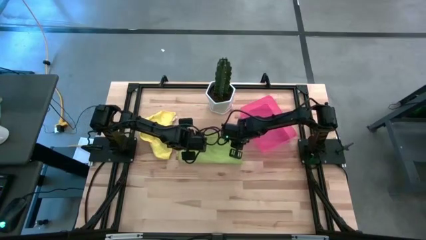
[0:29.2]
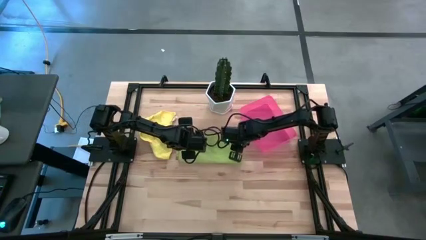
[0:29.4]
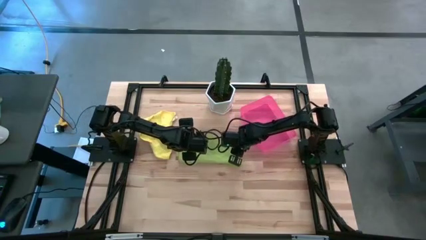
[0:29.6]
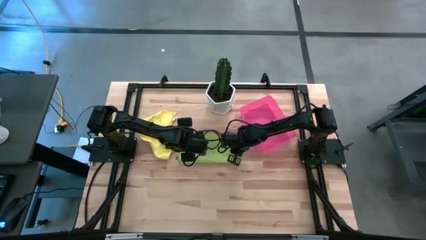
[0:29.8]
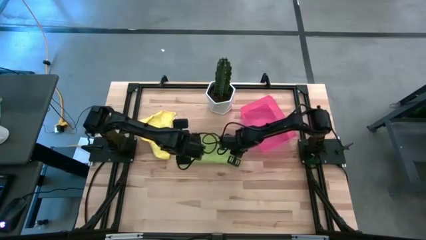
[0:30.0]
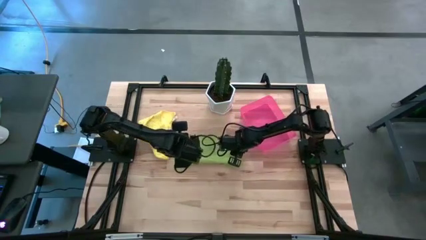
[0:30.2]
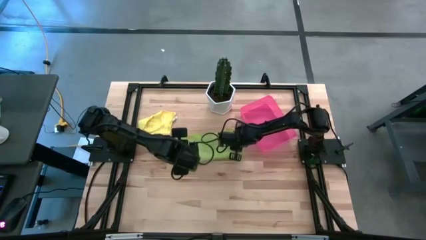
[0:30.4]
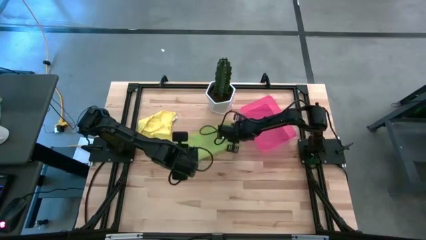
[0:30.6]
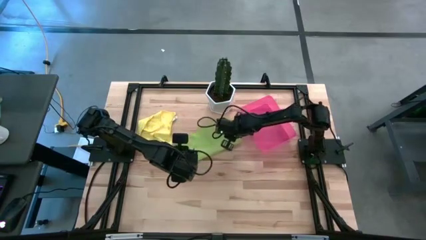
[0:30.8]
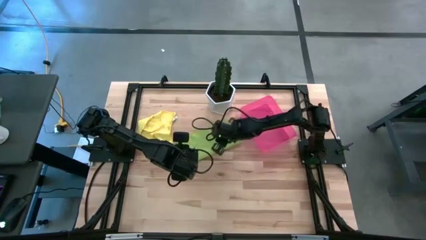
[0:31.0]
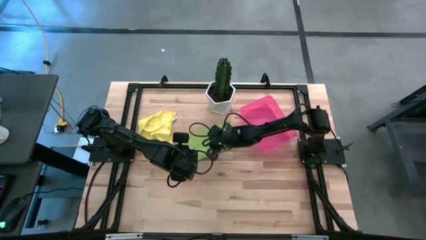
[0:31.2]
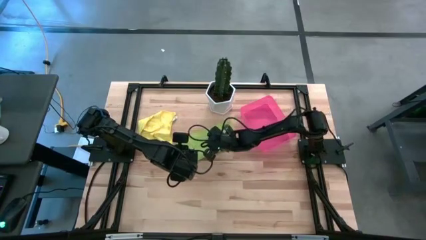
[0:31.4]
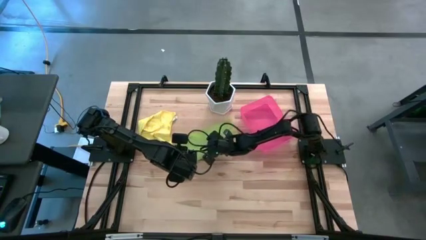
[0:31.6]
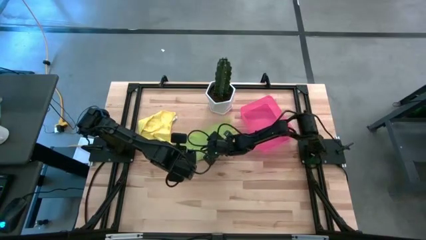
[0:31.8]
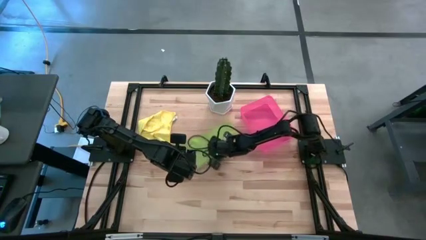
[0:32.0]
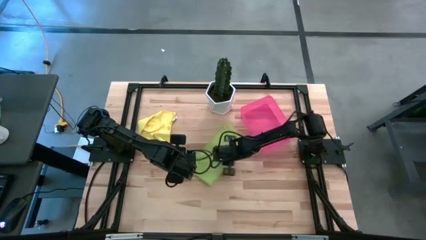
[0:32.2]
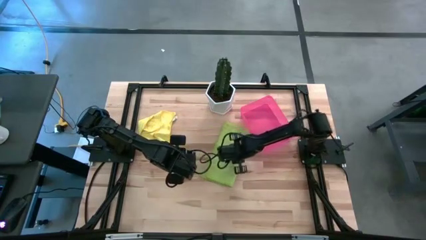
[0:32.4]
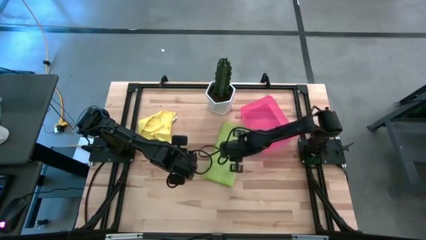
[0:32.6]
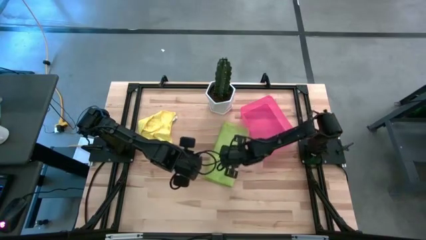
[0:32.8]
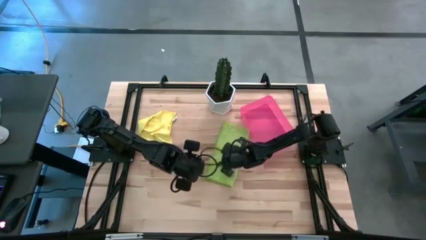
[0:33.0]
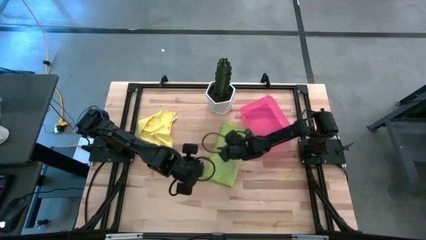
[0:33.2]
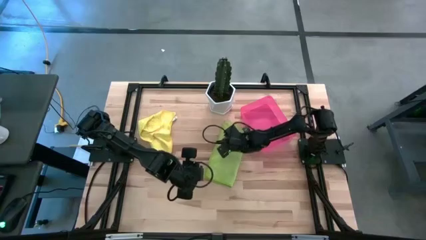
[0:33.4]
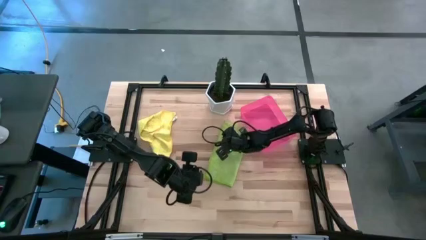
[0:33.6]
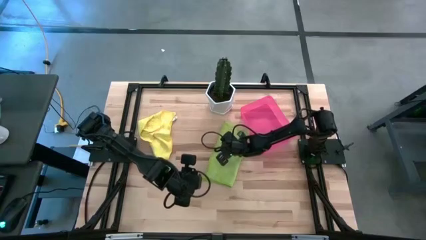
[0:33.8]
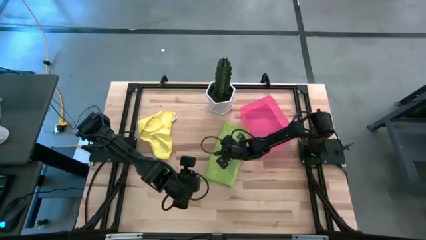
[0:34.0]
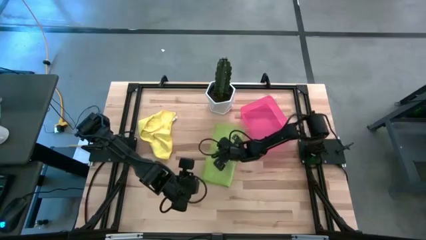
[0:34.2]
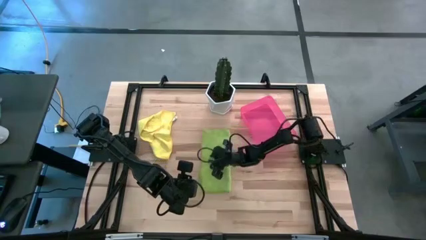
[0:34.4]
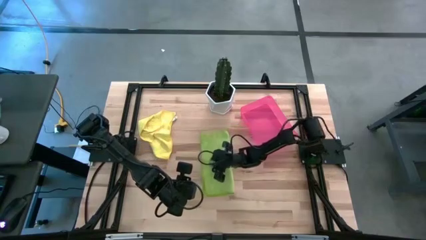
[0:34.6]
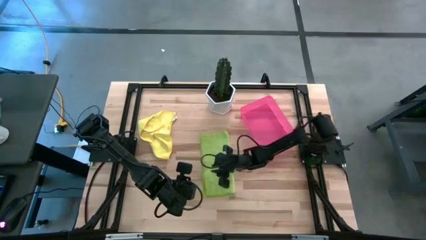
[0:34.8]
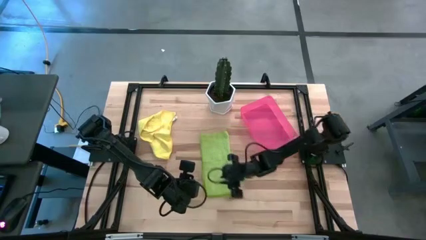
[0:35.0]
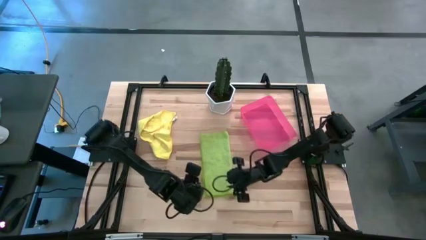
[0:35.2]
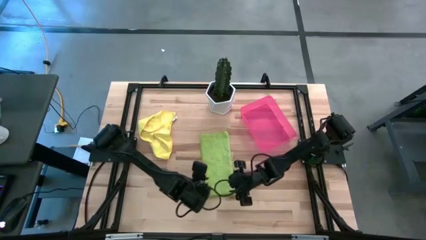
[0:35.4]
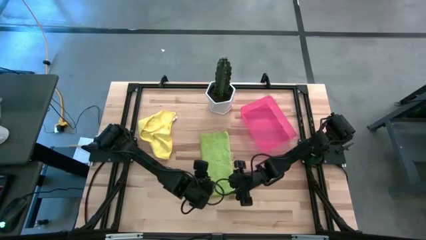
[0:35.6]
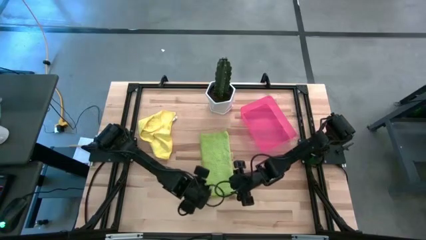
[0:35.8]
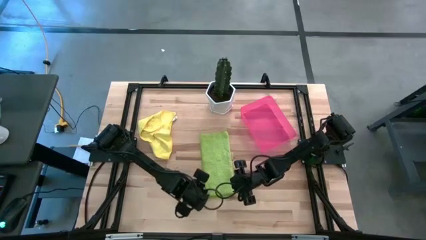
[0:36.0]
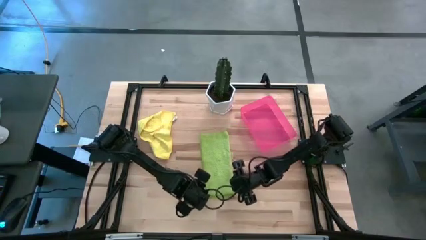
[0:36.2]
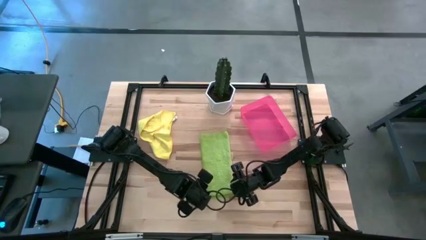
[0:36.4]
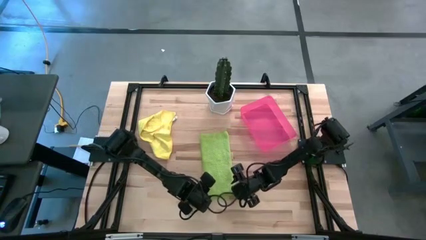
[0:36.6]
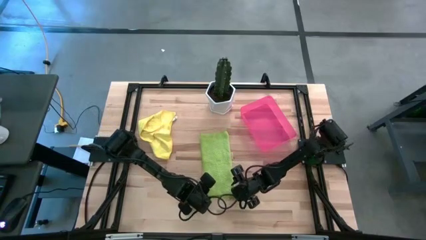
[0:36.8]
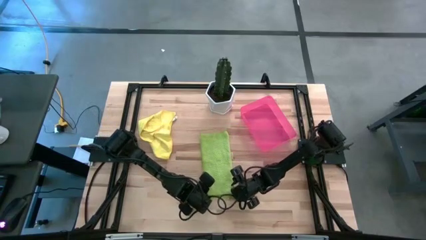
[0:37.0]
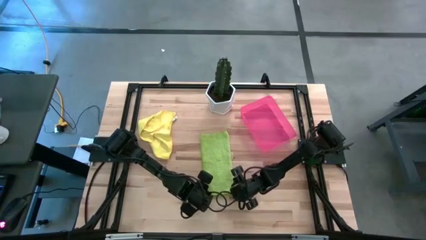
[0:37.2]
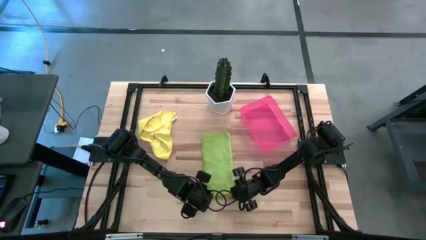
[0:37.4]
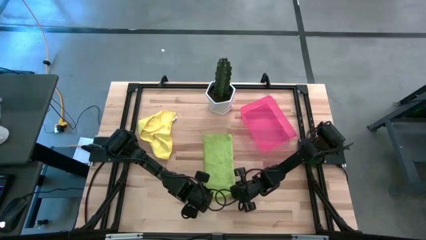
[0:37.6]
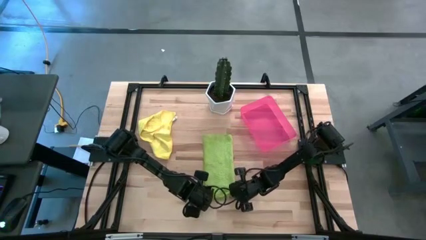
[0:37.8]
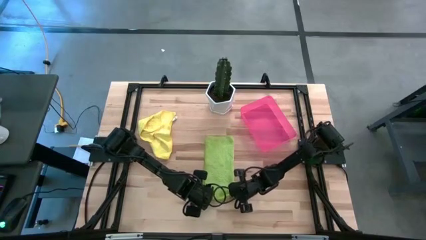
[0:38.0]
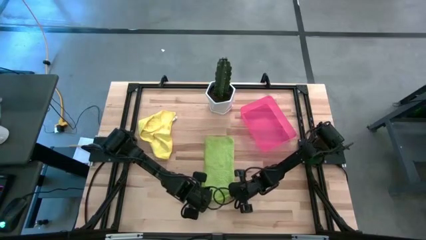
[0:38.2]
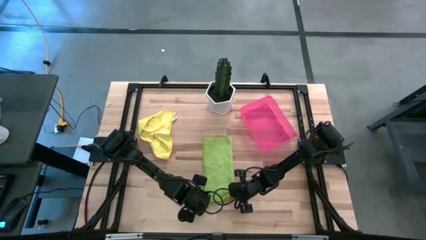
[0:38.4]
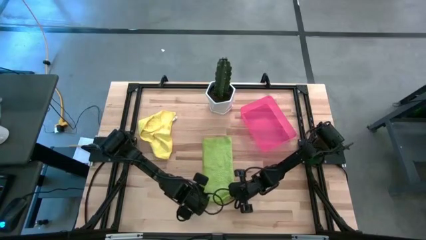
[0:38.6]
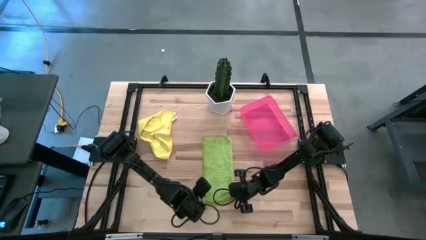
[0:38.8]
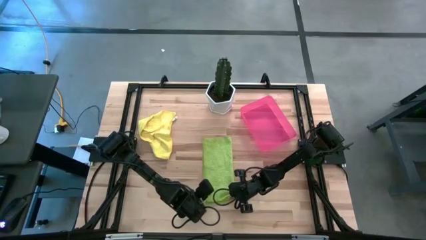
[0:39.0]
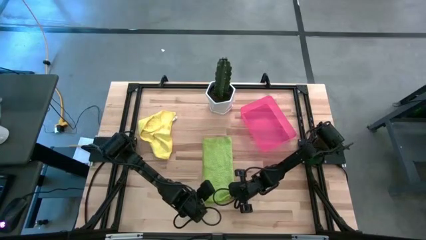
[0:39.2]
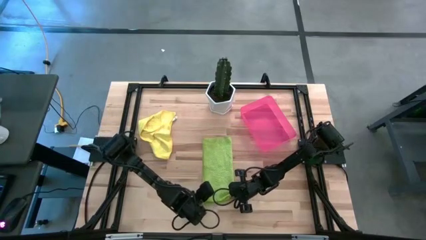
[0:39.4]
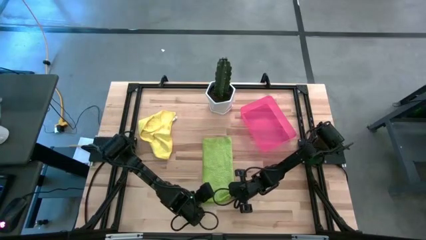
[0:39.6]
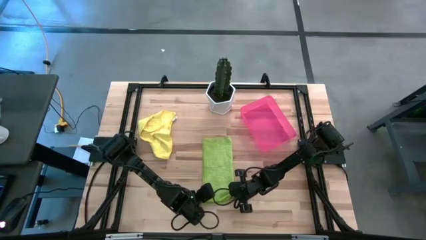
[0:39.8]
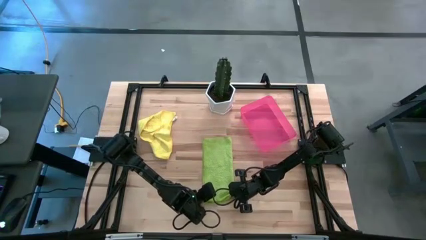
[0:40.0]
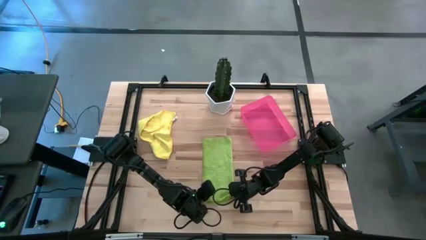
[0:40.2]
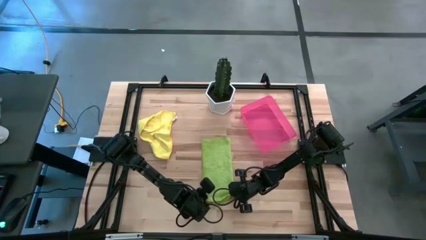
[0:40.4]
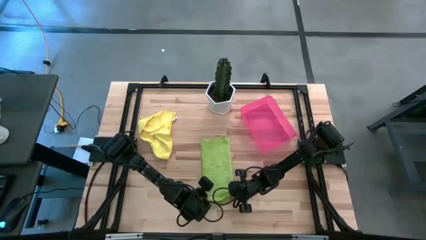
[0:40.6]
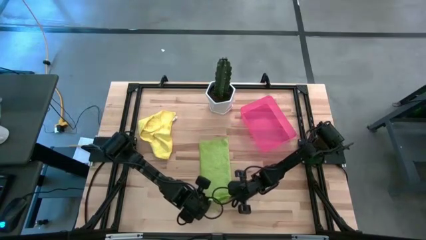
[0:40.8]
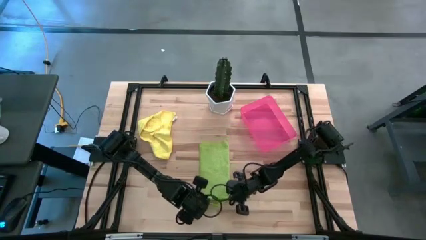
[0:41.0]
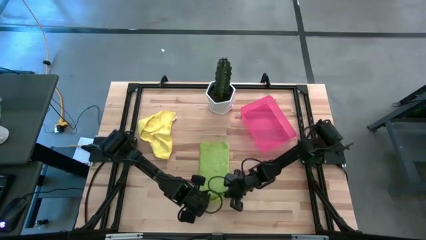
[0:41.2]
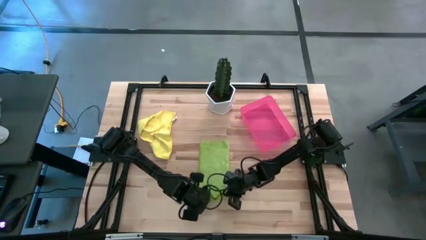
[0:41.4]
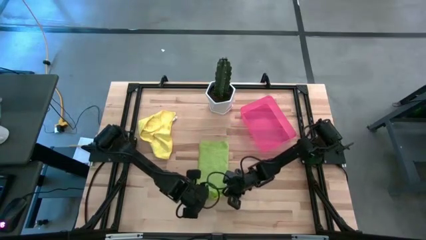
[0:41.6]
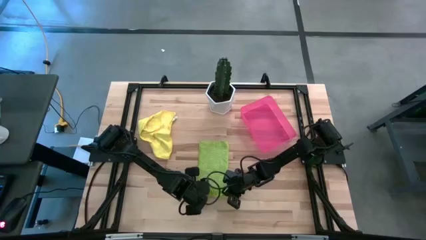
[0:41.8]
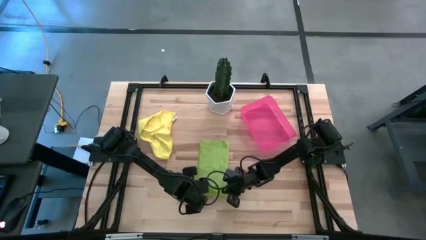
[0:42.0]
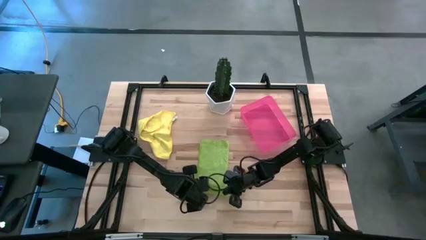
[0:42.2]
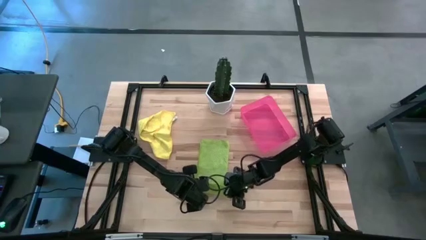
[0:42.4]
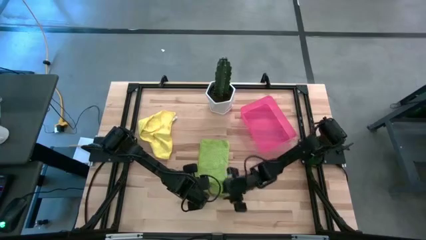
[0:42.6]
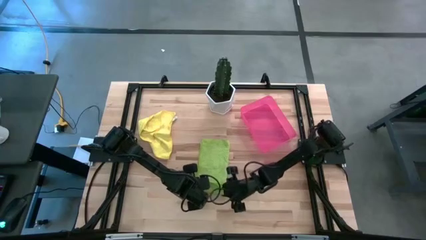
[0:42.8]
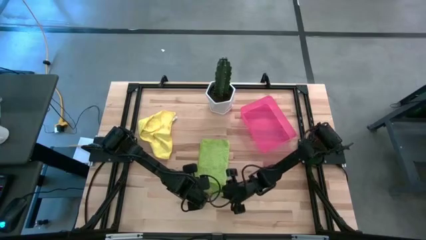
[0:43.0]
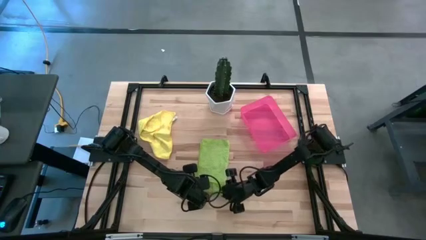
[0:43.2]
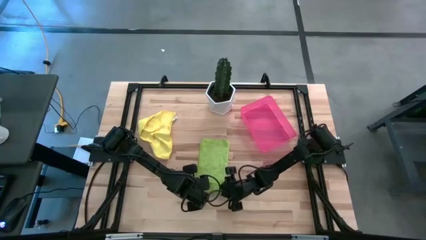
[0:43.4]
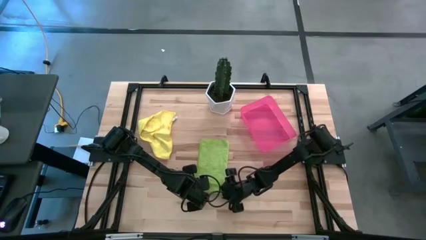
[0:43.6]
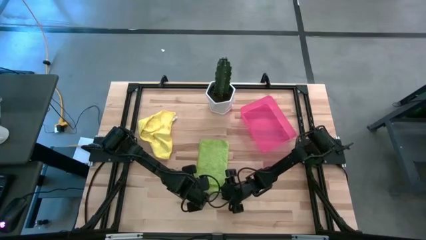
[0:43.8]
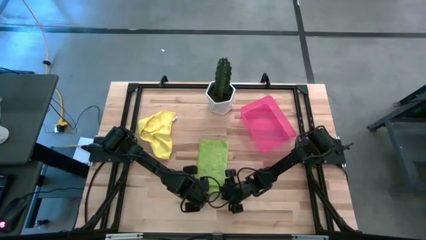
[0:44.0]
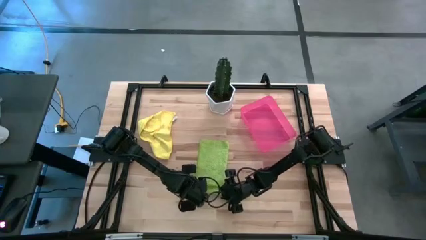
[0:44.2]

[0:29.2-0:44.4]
Task: Roll microfiber towels into tight, uniform cylinder then place into a basket
Roll the green towel
